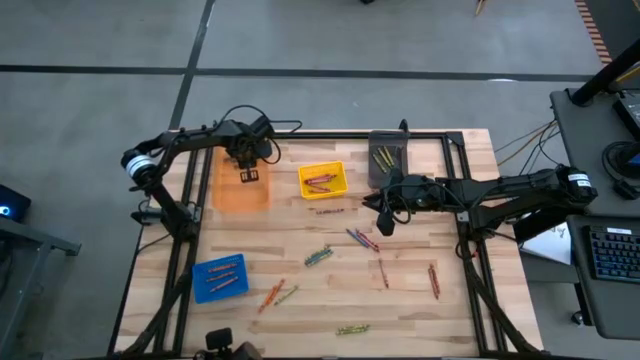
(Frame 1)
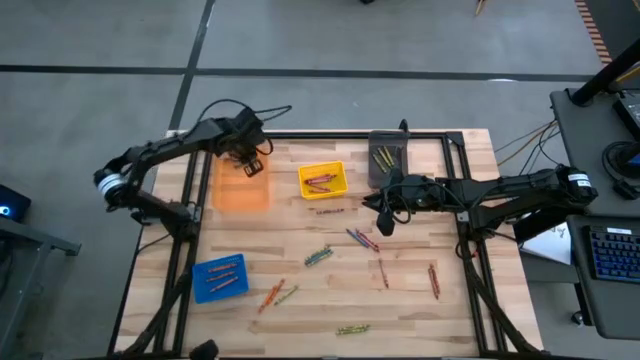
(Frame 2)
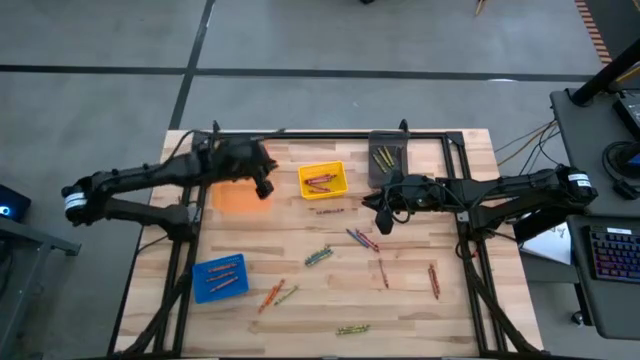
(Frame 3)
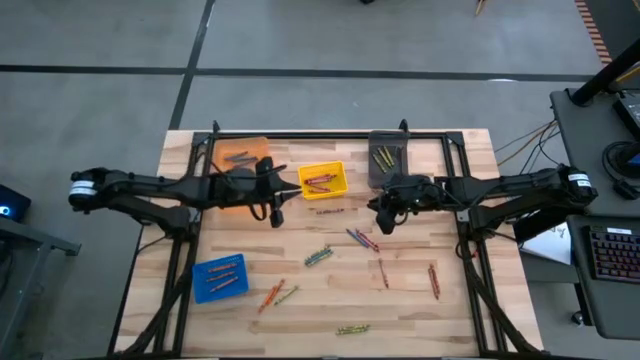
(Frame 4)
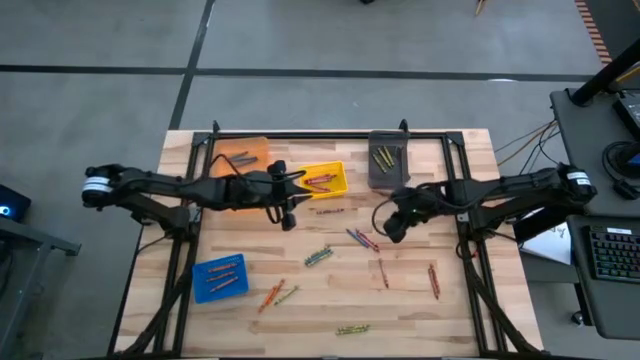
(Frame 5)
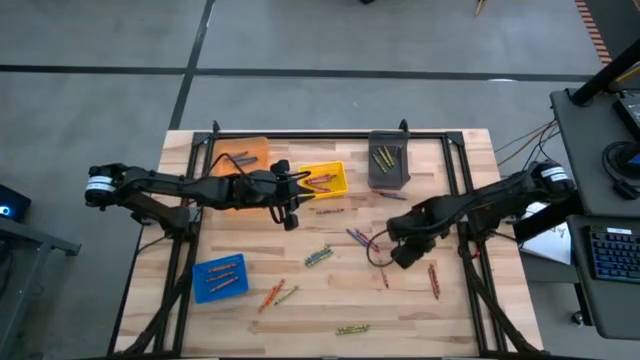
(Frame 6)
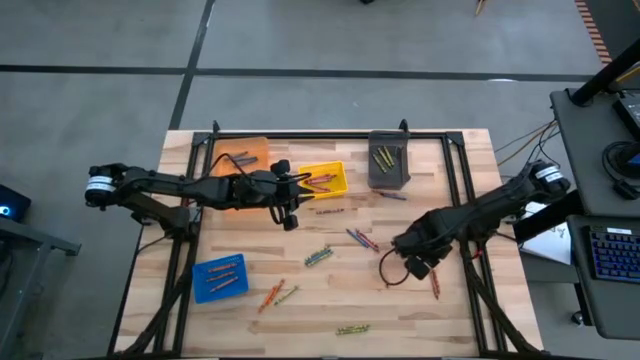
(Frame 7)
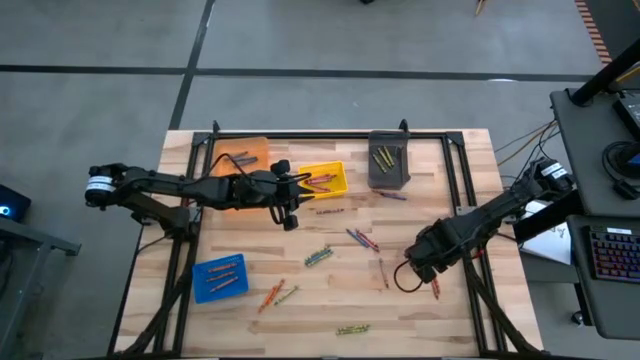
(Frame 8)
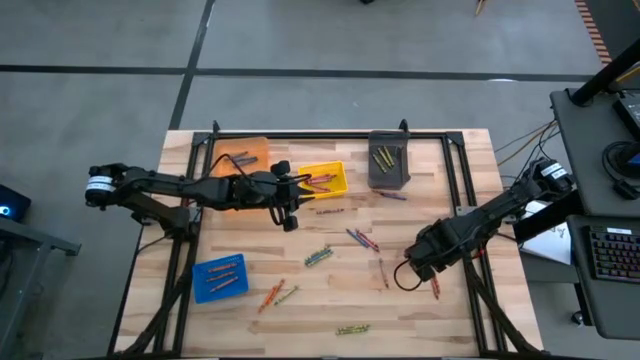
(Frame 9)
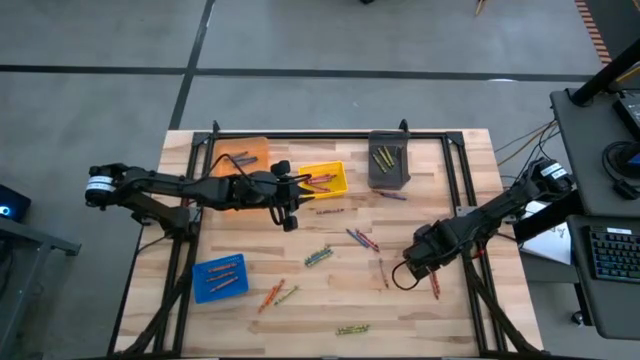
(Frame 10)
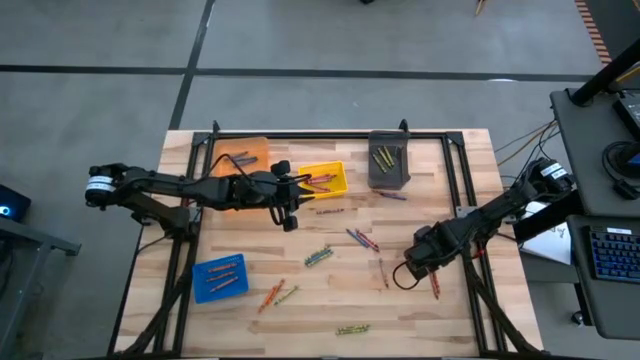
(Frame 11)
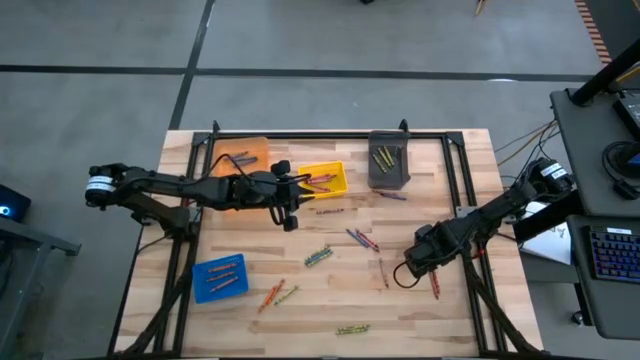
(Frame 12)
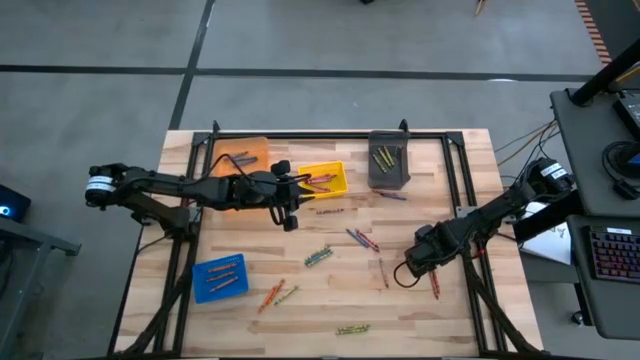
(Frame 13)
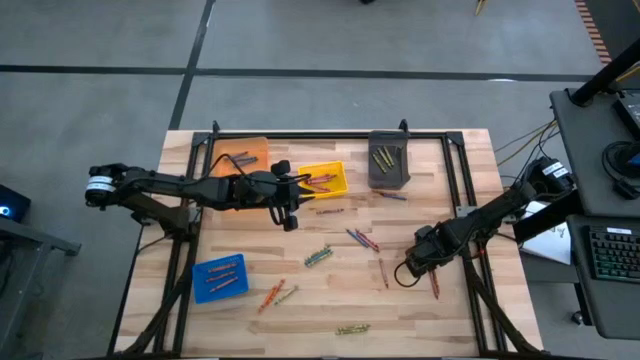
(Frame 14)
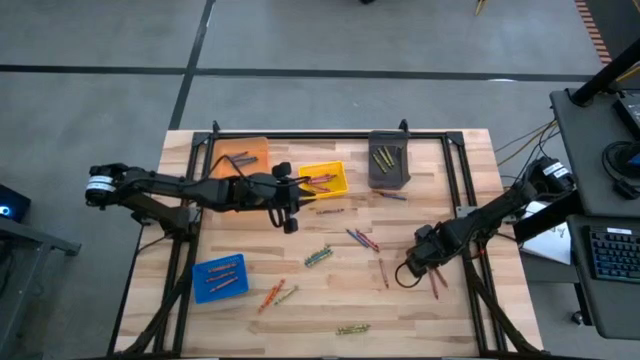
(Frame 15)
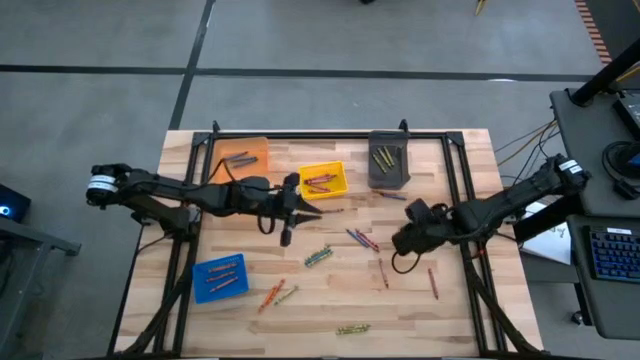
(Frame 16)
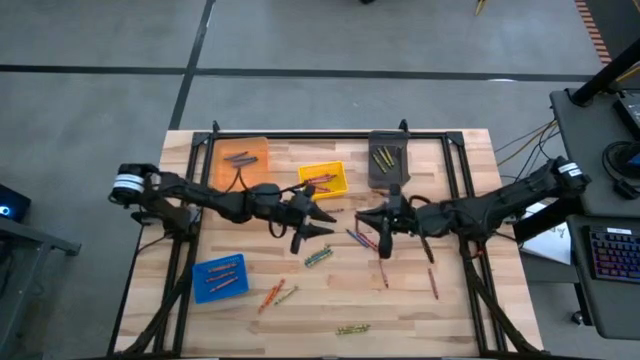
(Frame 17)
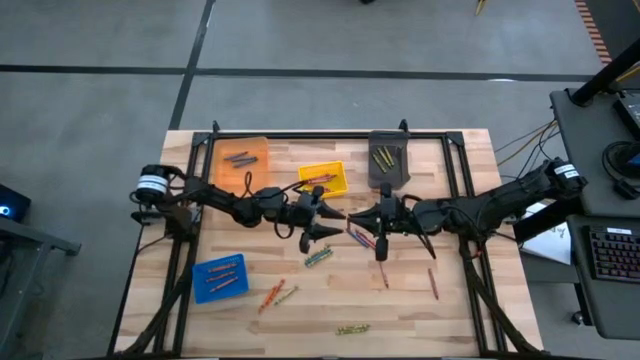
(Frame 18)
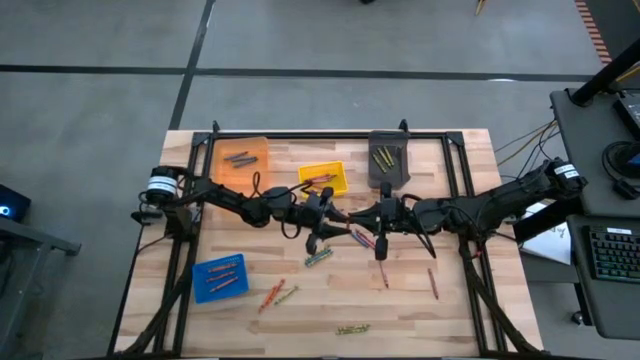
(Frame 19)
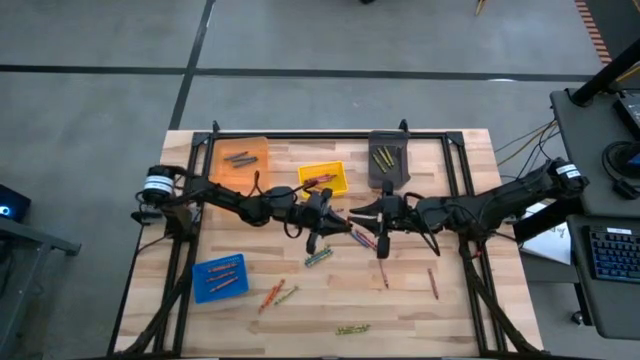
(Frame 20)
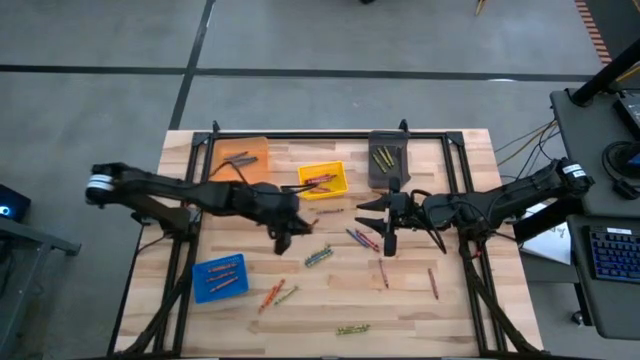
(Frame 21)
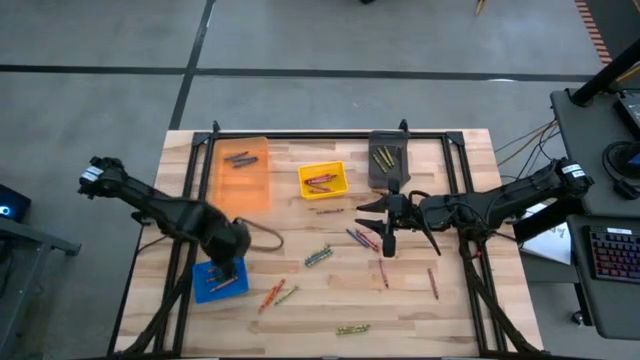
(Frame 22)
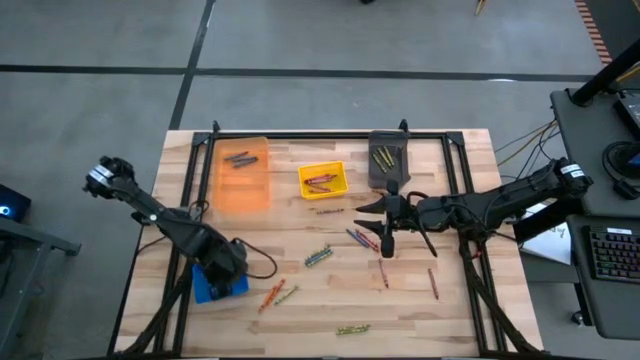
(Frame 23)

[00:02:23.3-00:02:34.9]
Task: Sort crayons
Put the orange crayon into the blue bin

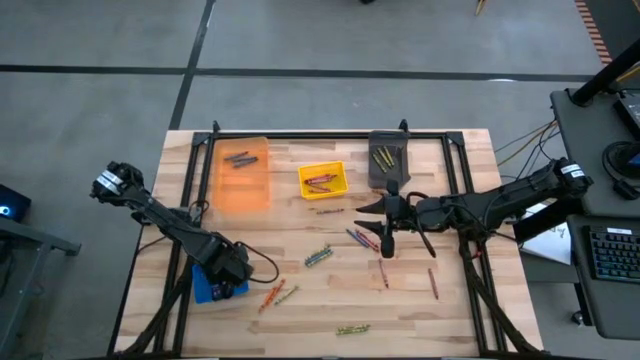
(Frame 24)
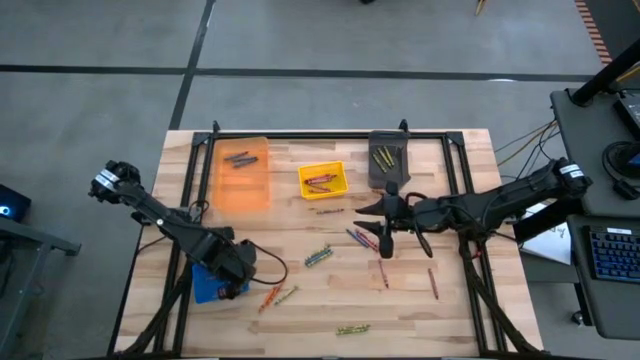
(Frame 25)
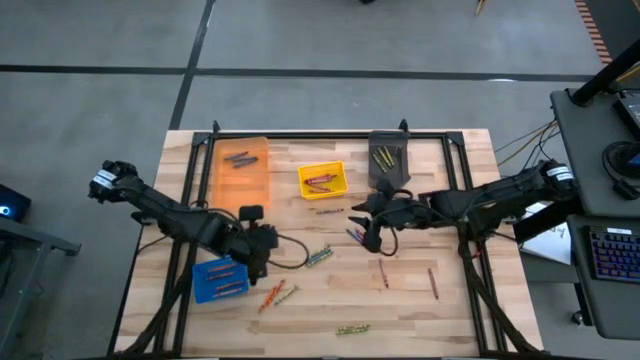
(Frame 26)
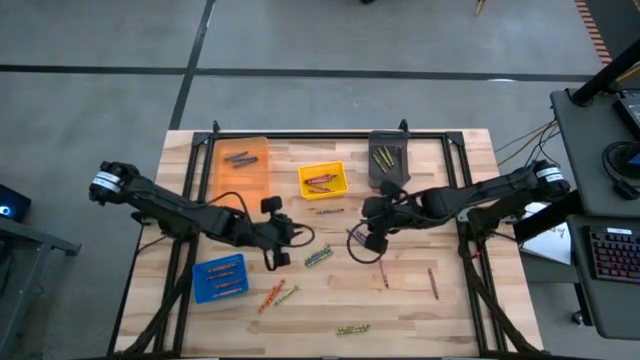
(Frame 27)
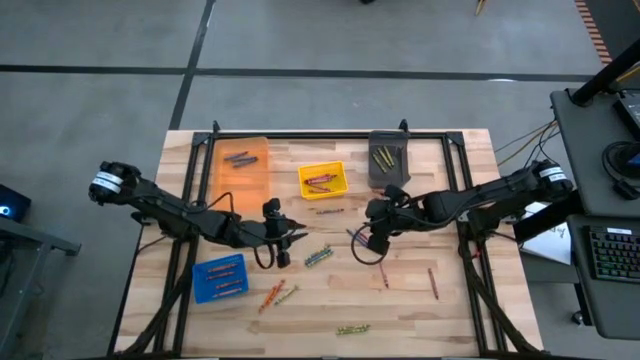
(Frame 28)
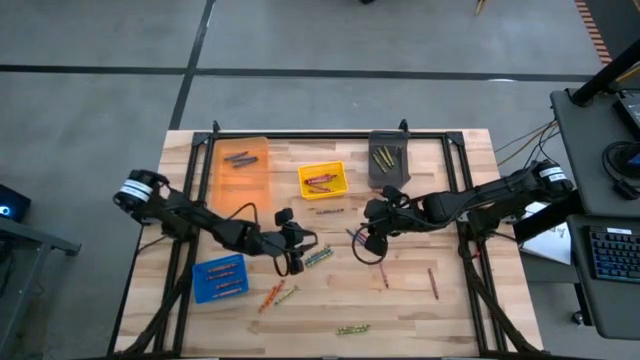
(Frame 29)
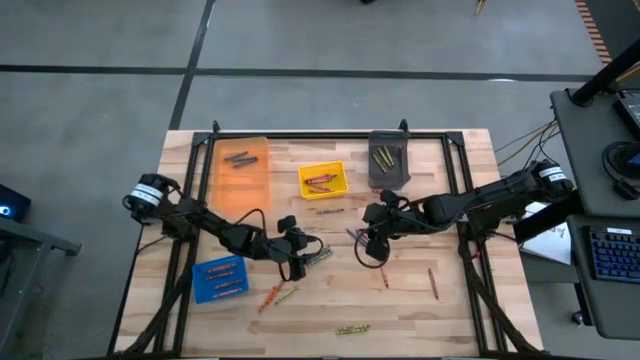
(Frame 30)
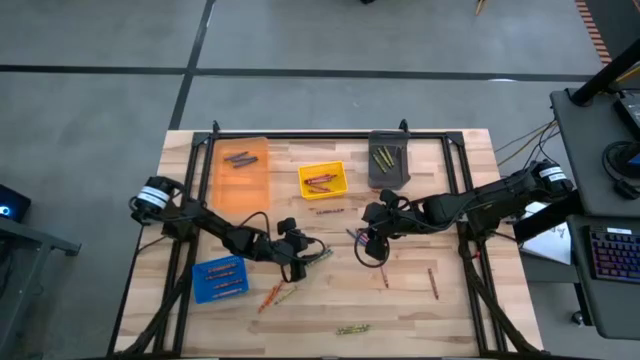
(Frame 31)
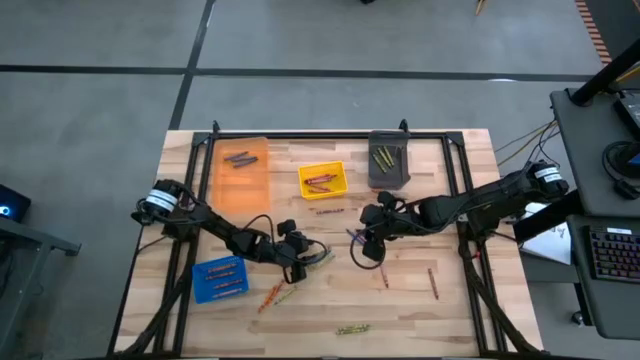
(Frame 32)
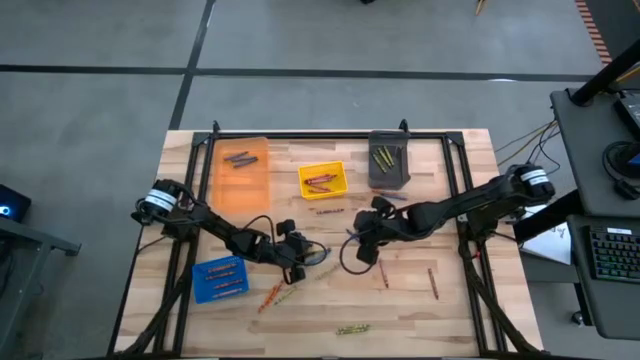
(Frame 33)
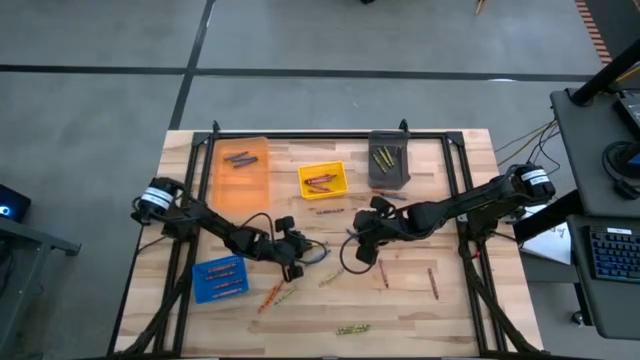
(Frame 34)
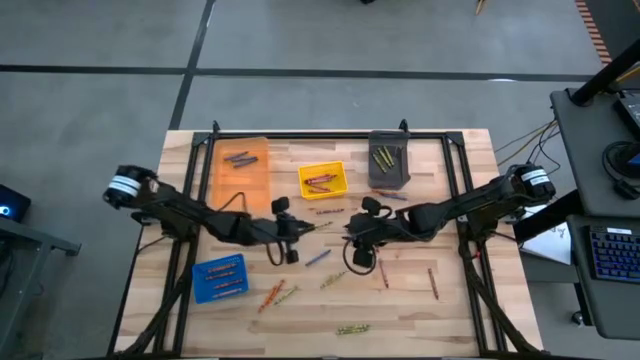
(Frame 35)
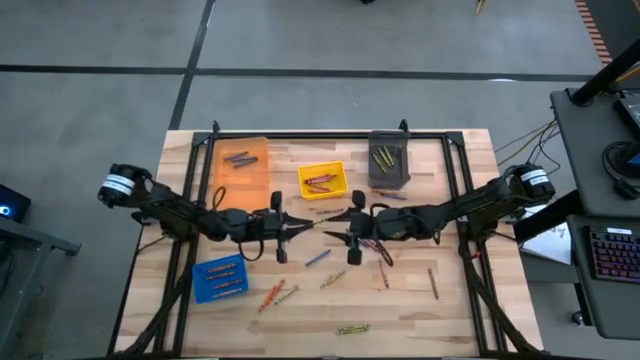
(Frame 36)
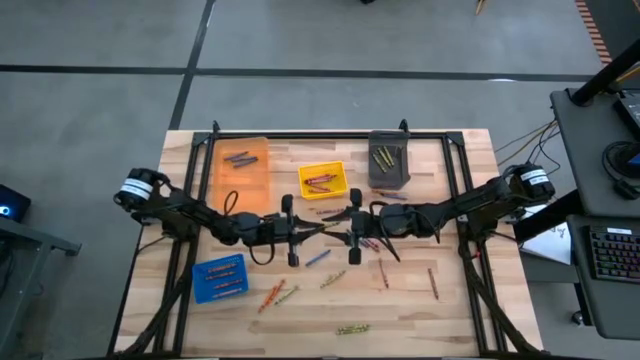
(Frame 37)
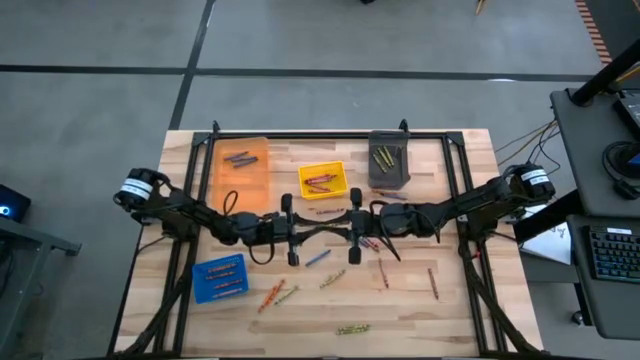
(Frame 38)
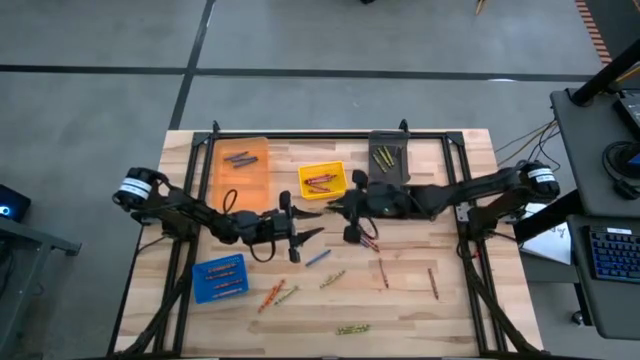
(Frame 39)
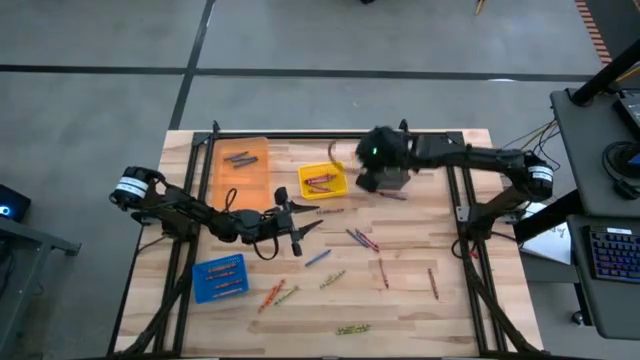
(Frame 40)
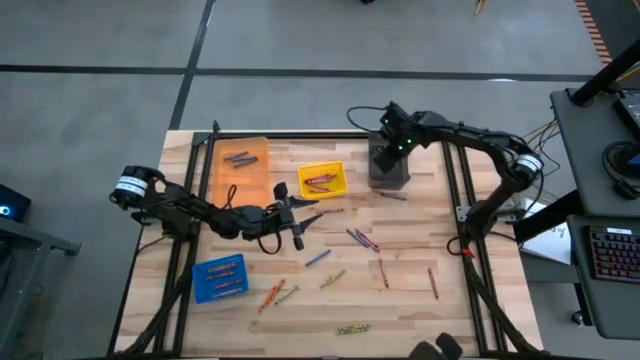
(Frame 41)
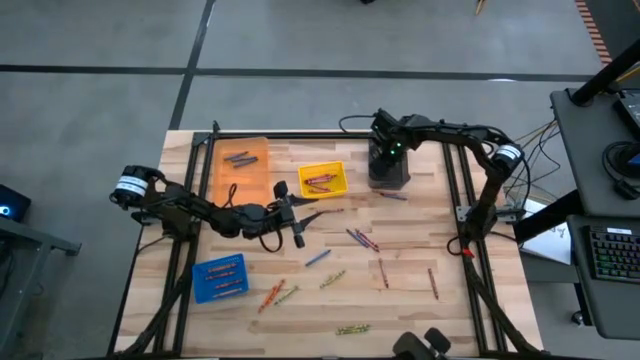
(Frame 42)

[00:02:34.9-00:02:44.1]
Put the green crayon into the black bin
